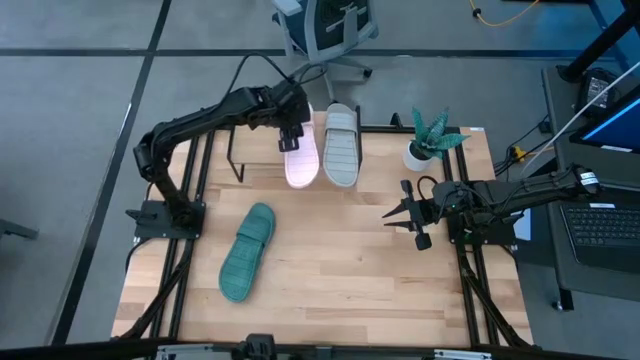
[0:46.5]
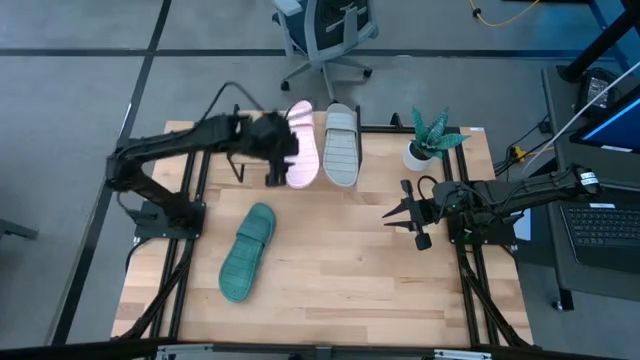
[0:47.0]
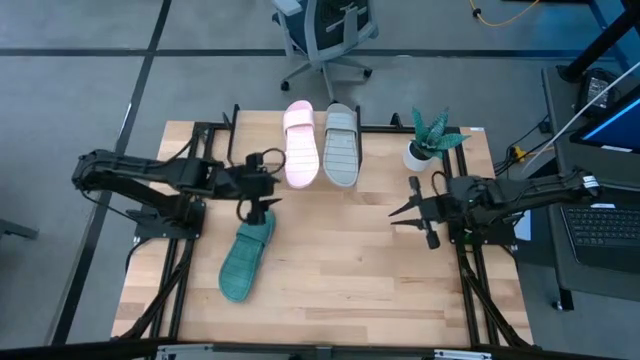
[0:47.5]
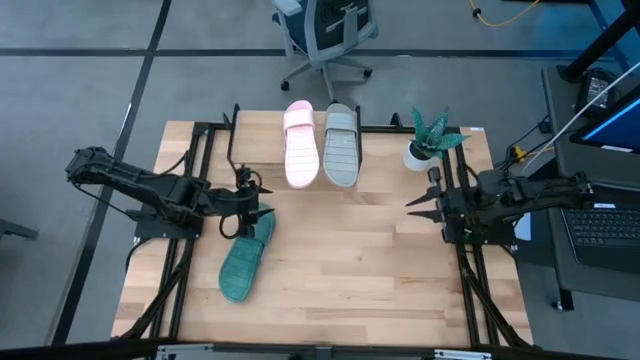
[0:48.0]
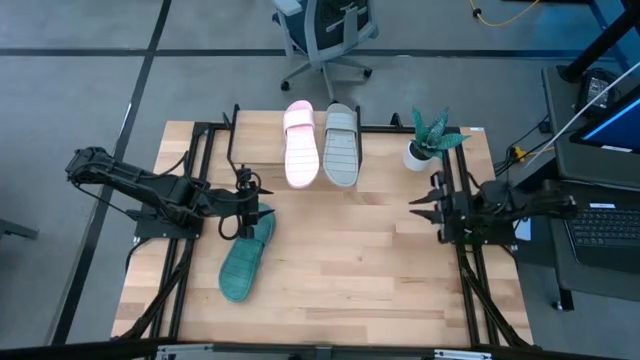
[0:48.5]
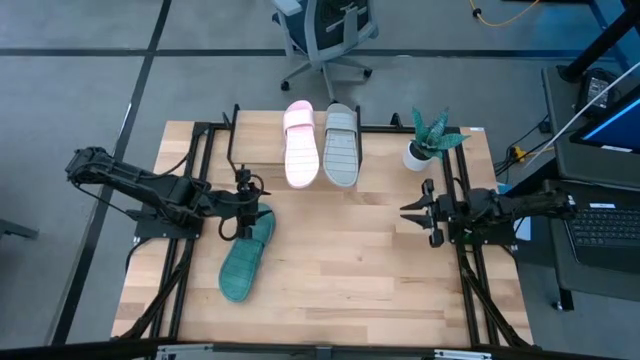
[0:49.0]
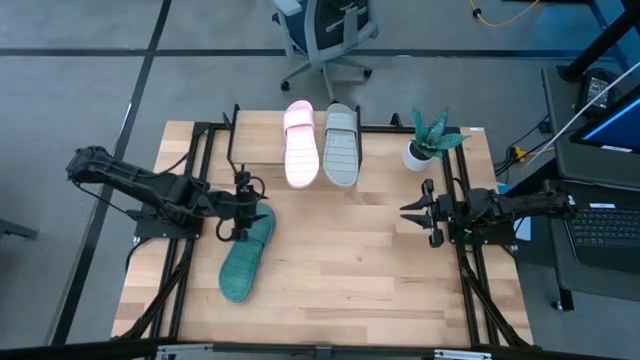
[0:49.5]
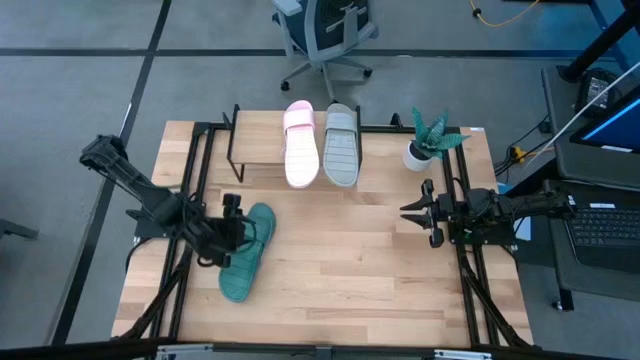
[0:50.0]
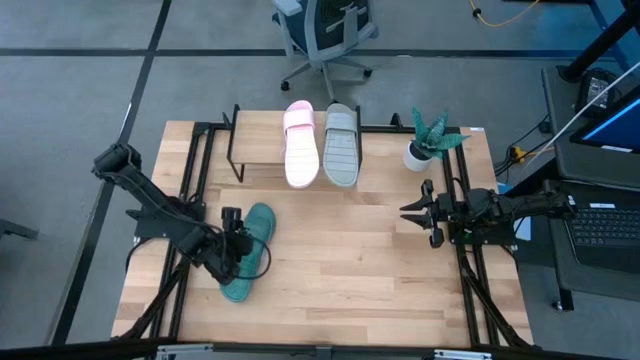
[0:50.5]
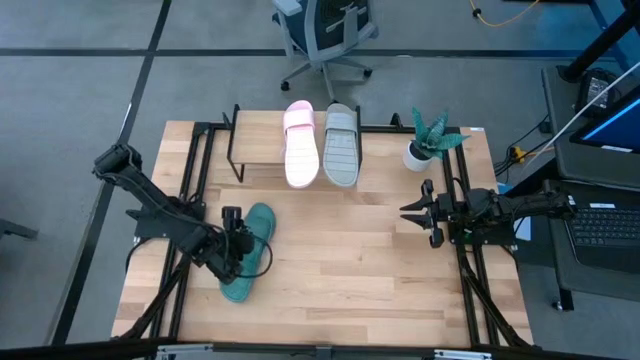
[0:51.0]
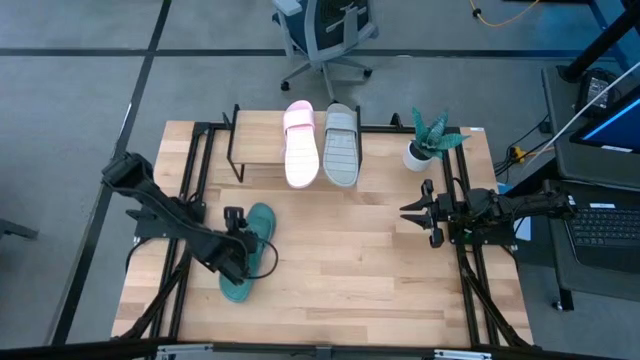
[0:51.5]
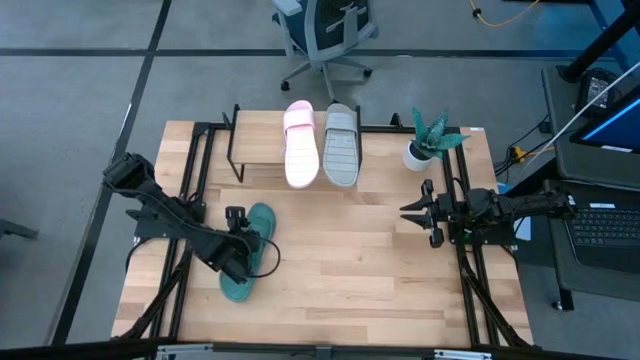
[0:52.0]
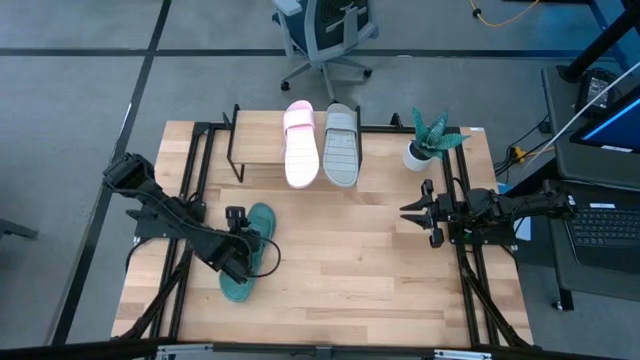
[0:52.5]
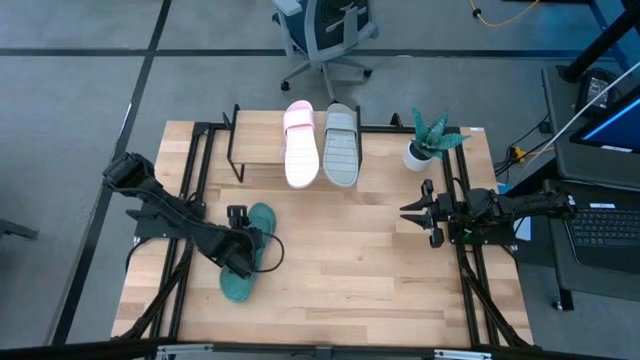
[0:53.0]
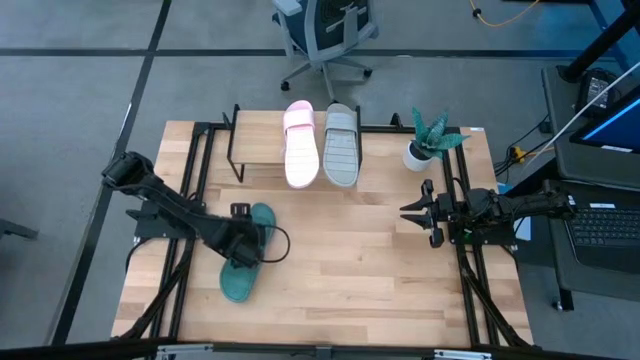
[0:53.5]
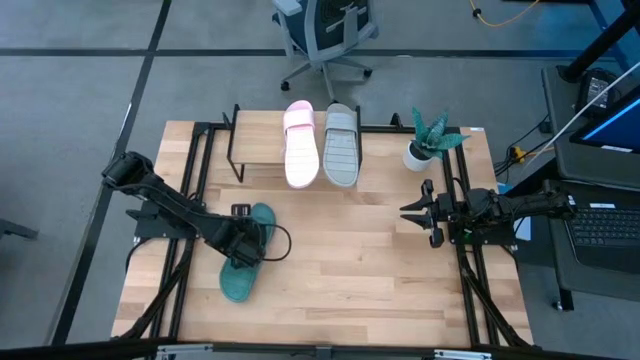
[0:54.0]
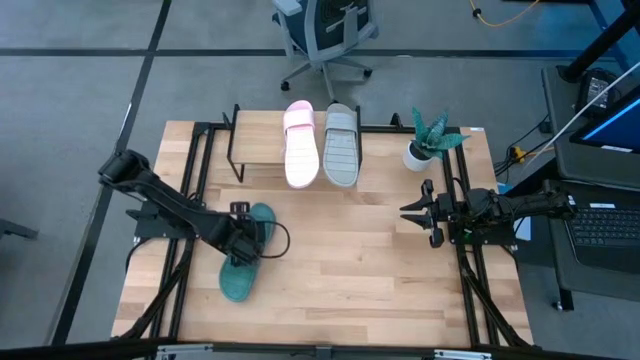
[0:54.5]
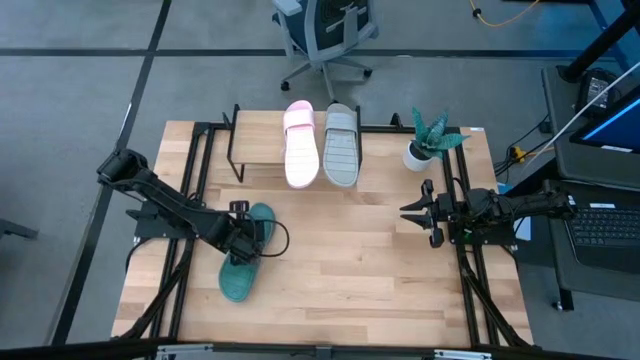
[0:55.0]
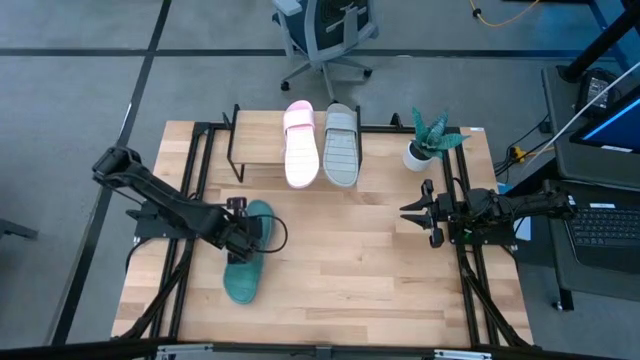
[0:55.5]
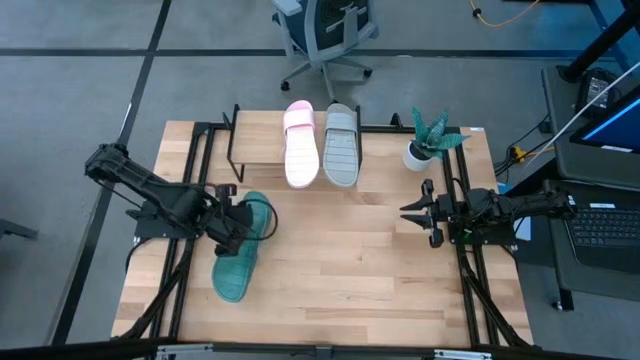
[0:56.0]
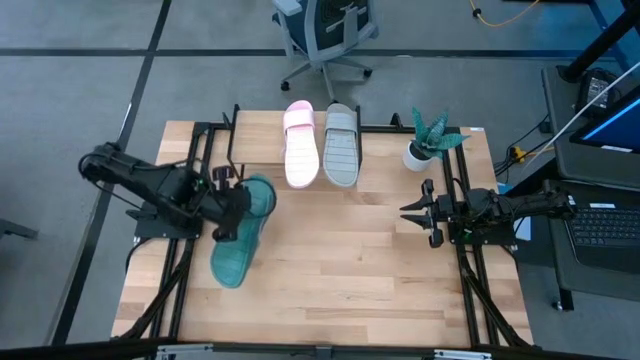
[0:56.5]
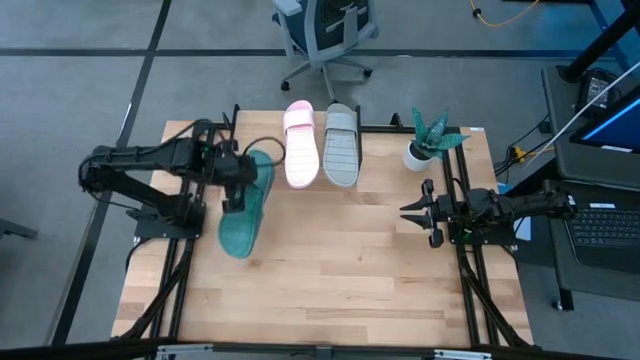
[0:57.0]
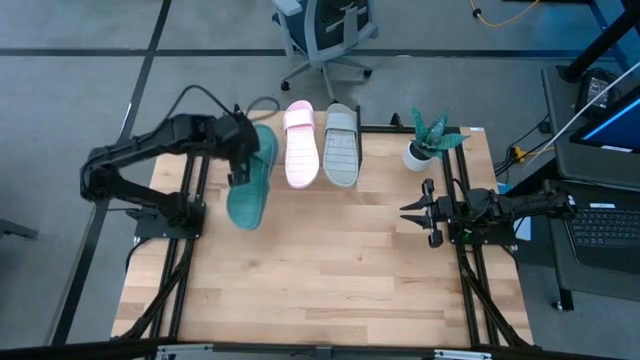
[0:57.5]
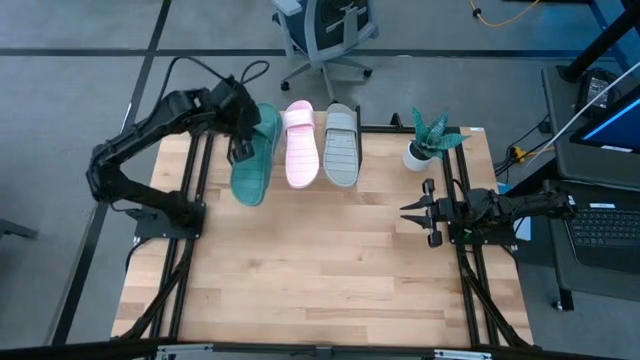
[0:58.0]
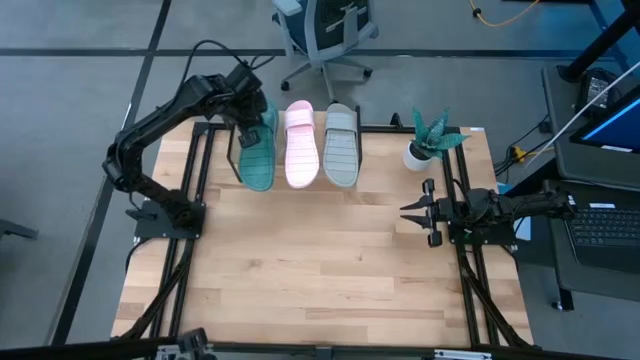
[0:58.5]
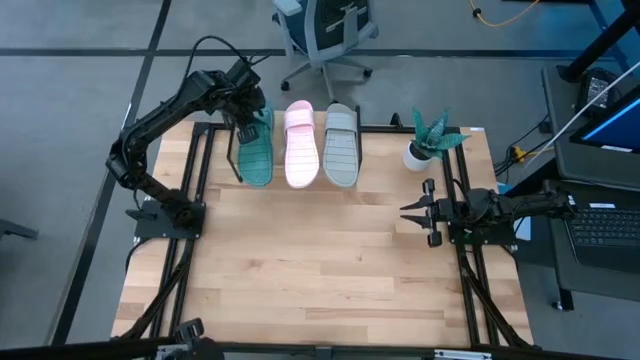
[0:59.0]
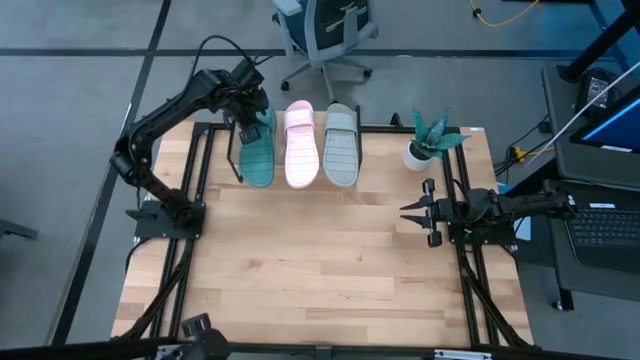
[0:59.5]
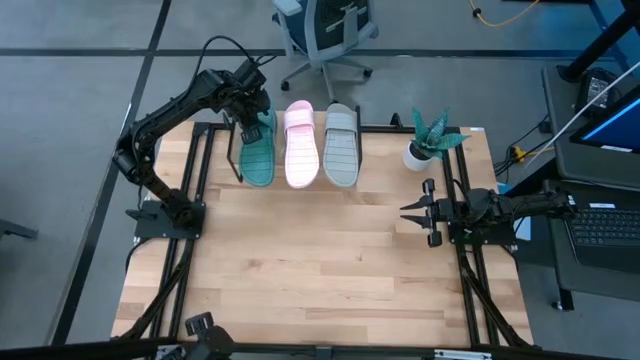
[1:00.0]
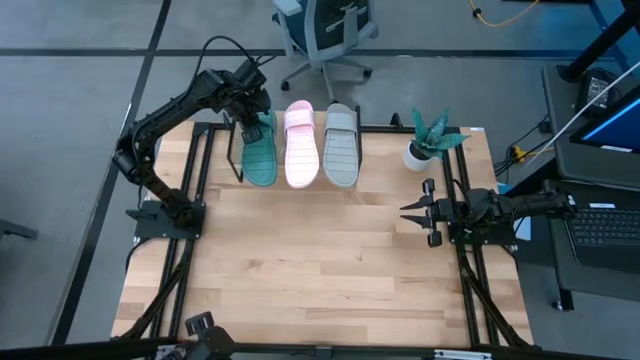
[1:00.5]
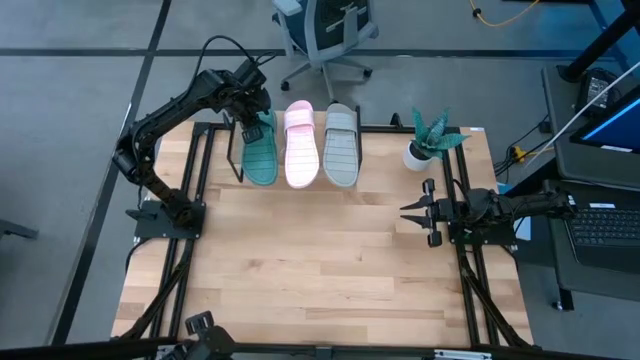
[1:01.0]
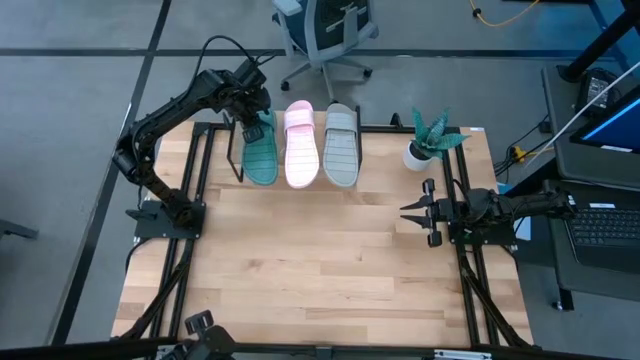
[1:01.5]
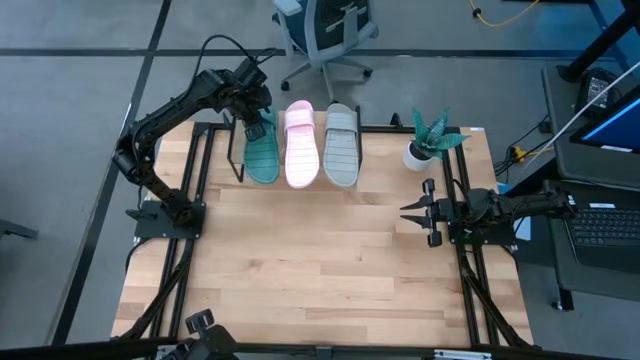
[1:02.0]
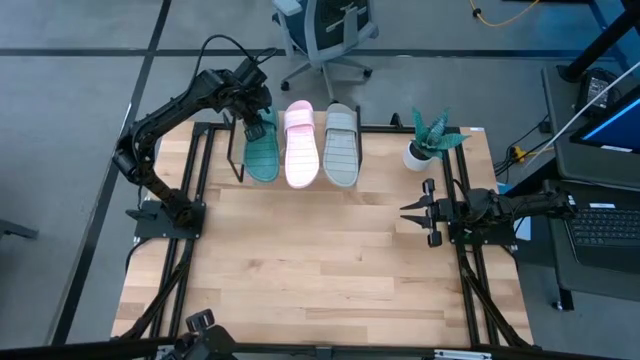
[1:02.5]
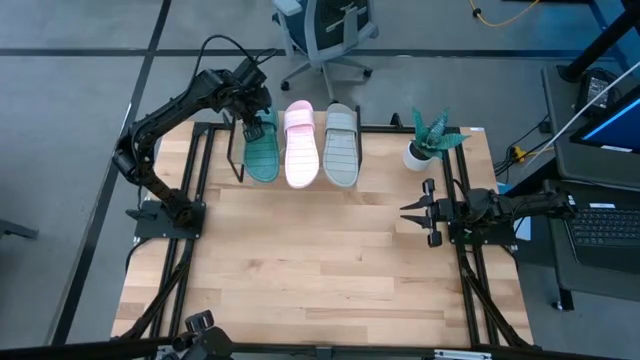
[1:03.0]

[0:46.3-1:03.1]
Task: Pick and place slippers onto the shelf
Put the pair of green slippers on the shelf
